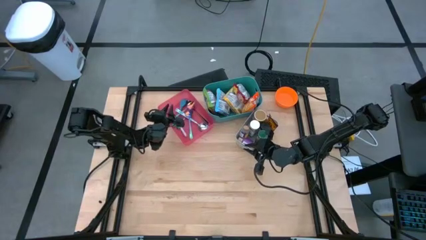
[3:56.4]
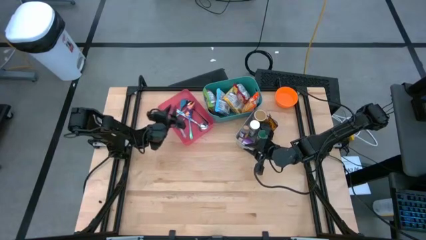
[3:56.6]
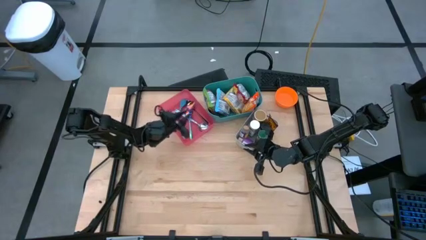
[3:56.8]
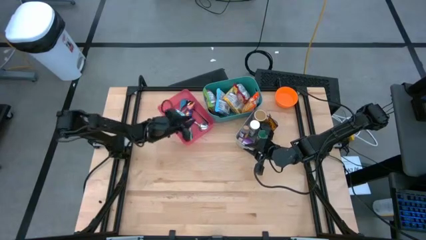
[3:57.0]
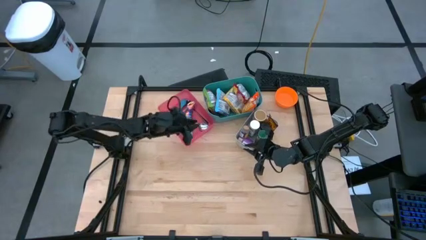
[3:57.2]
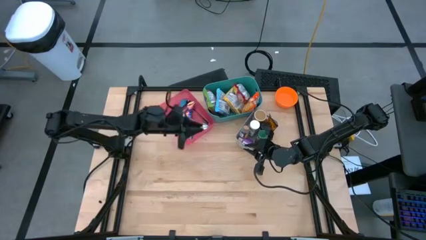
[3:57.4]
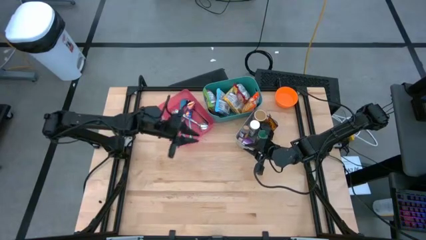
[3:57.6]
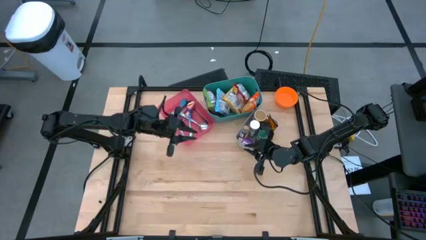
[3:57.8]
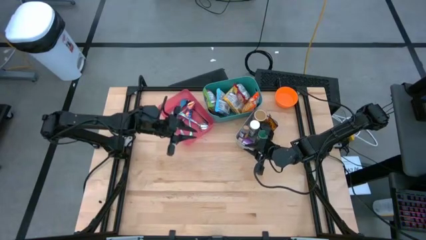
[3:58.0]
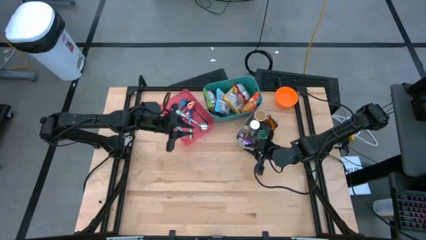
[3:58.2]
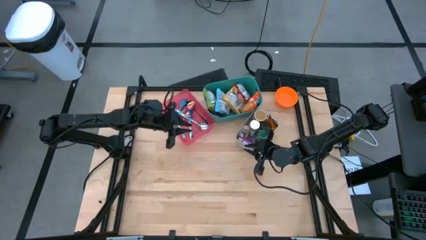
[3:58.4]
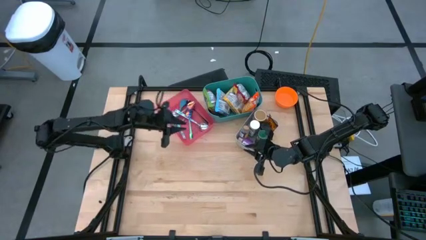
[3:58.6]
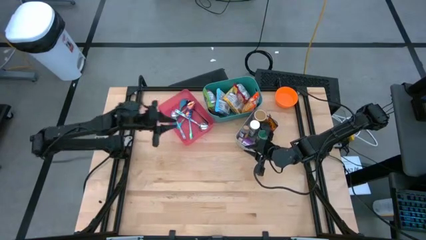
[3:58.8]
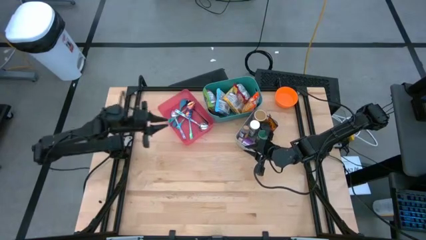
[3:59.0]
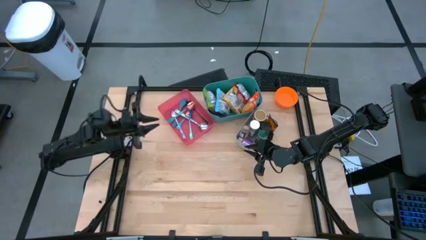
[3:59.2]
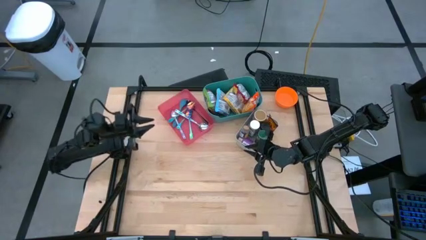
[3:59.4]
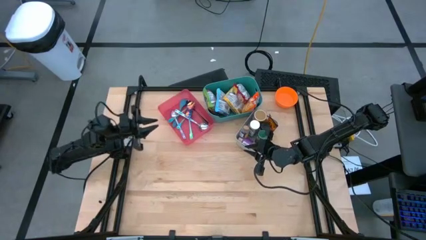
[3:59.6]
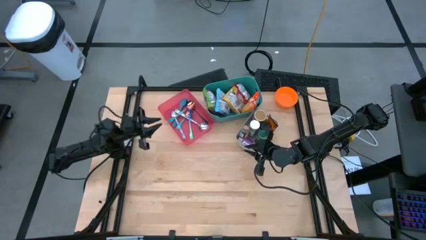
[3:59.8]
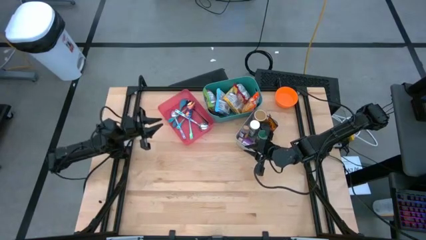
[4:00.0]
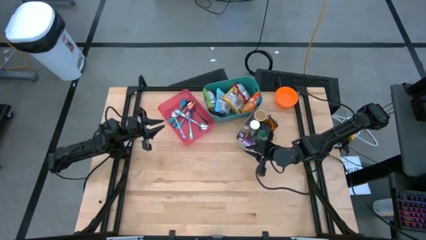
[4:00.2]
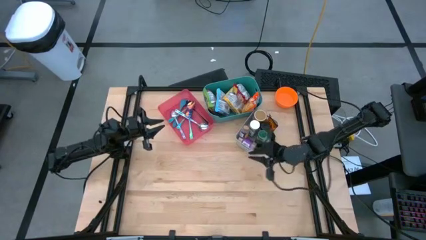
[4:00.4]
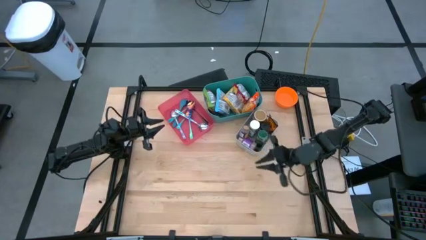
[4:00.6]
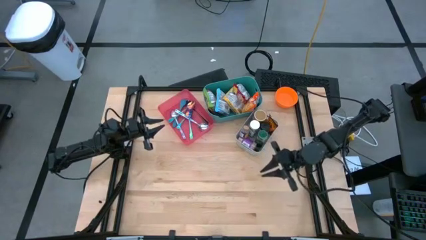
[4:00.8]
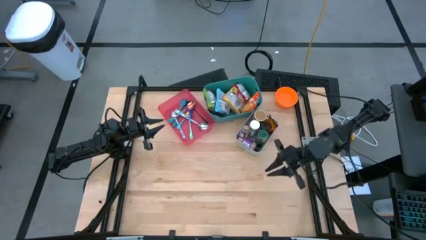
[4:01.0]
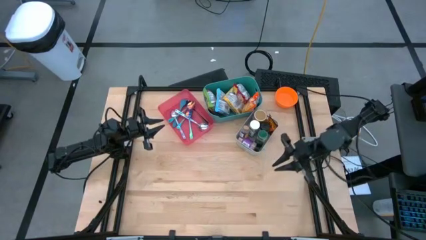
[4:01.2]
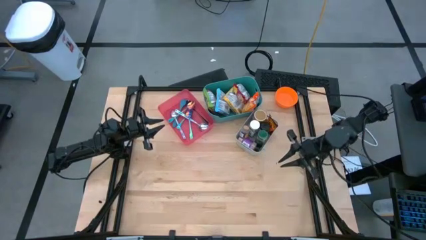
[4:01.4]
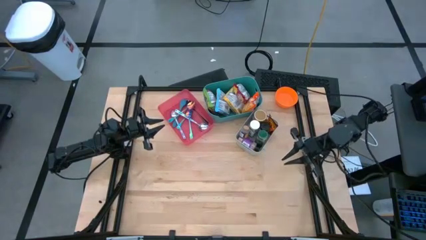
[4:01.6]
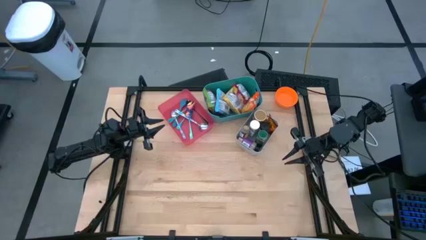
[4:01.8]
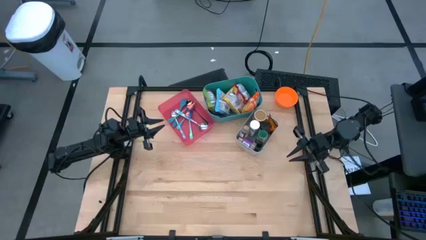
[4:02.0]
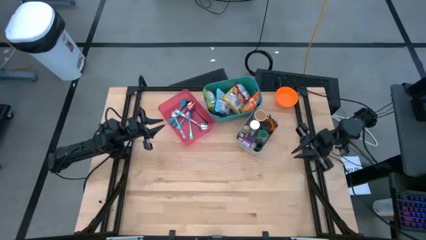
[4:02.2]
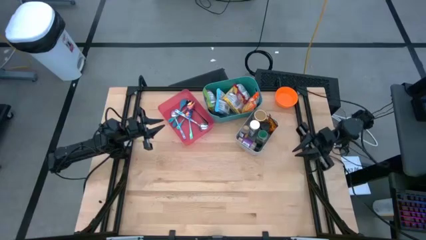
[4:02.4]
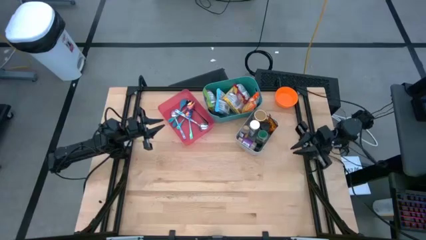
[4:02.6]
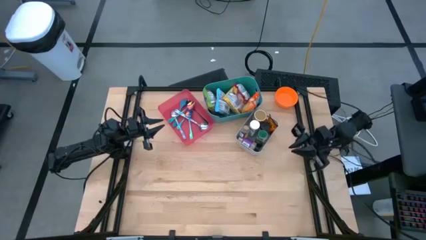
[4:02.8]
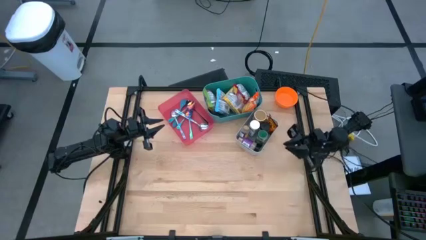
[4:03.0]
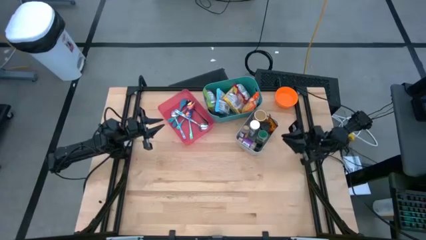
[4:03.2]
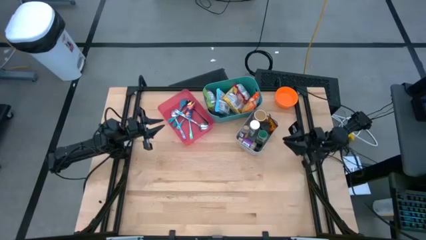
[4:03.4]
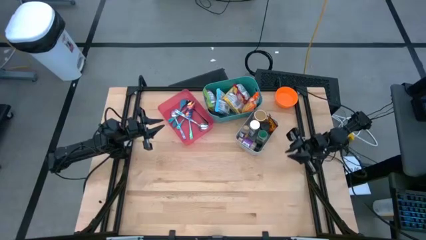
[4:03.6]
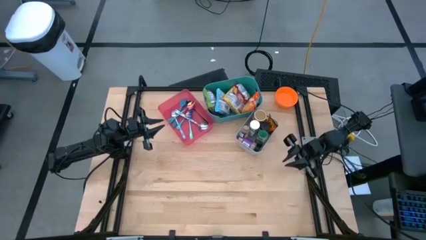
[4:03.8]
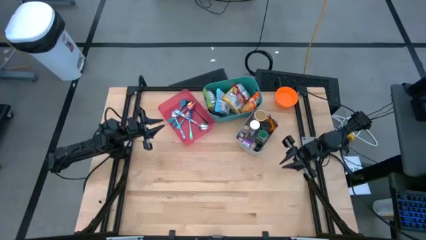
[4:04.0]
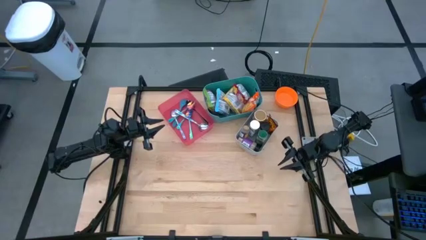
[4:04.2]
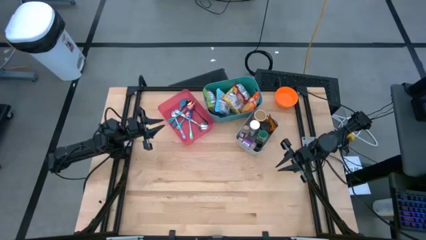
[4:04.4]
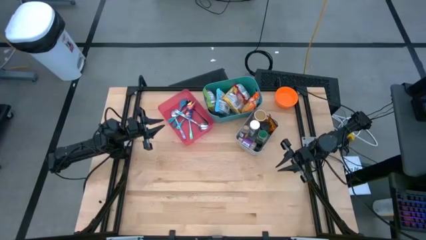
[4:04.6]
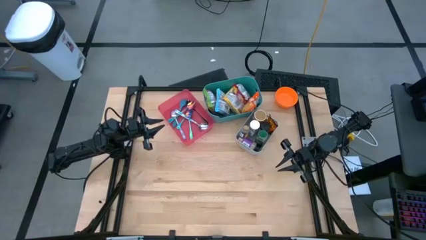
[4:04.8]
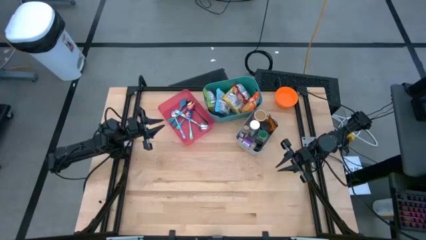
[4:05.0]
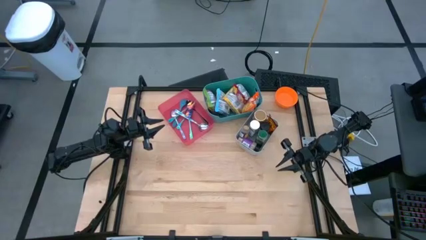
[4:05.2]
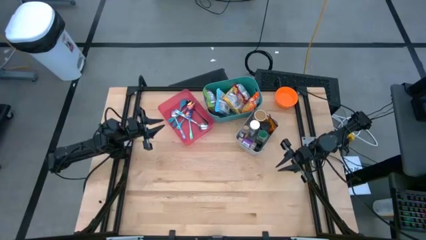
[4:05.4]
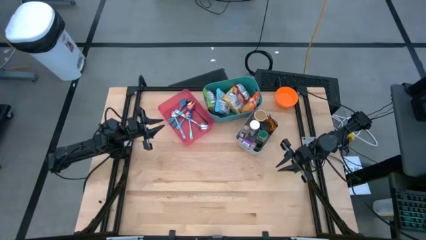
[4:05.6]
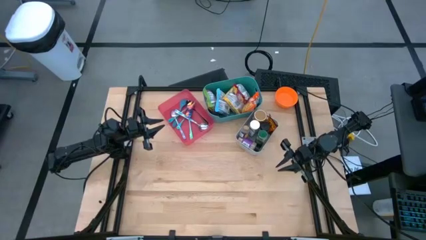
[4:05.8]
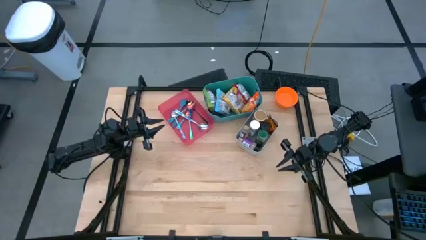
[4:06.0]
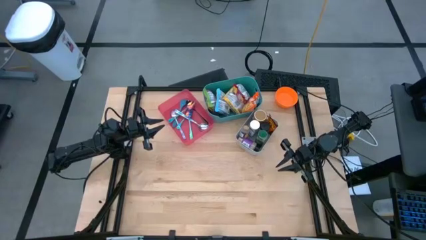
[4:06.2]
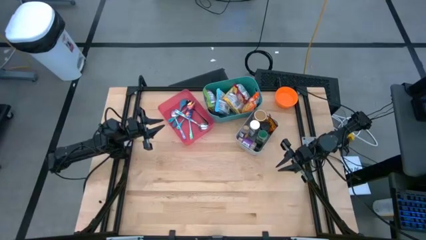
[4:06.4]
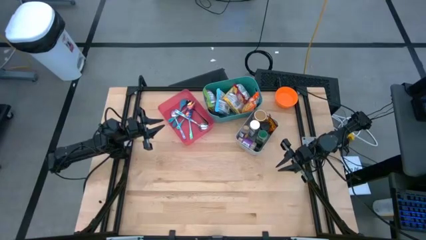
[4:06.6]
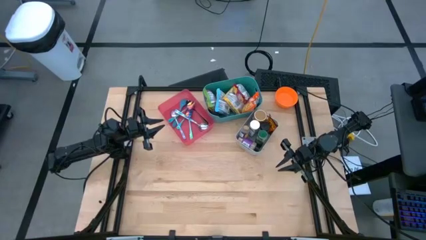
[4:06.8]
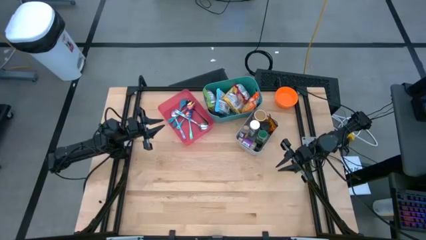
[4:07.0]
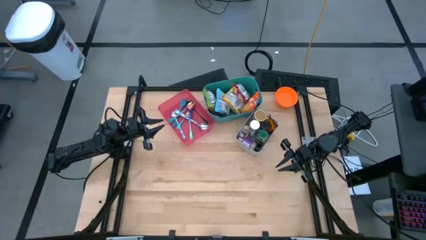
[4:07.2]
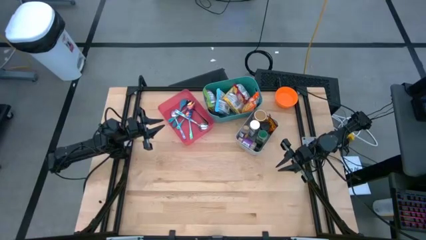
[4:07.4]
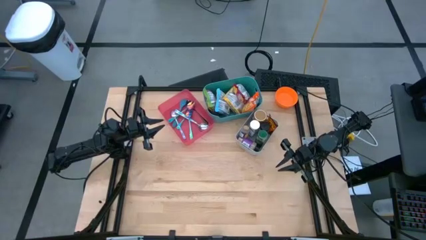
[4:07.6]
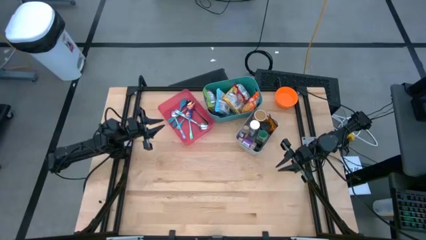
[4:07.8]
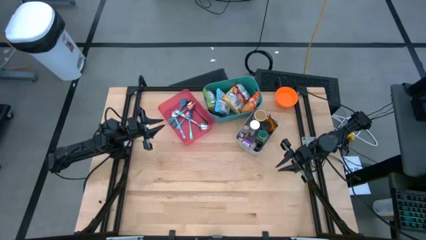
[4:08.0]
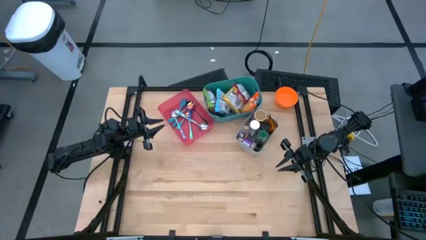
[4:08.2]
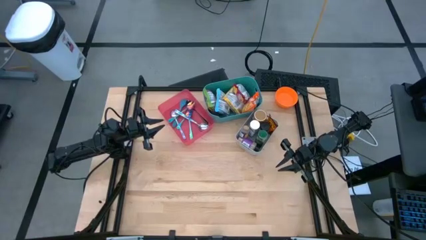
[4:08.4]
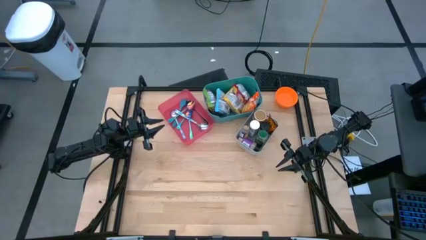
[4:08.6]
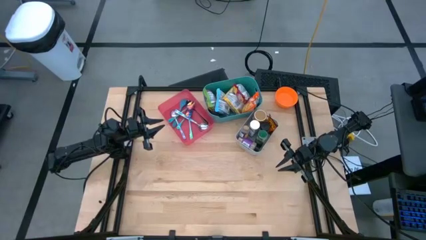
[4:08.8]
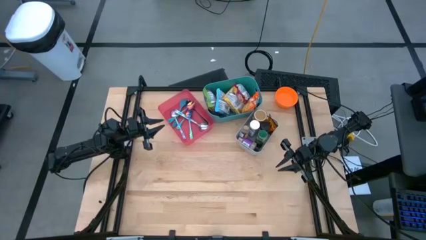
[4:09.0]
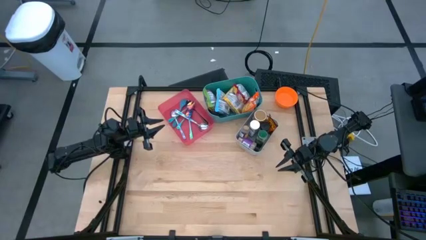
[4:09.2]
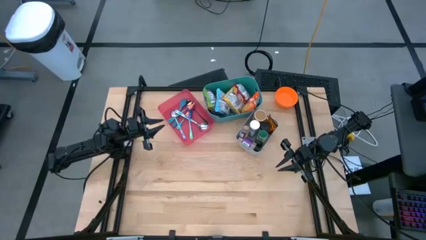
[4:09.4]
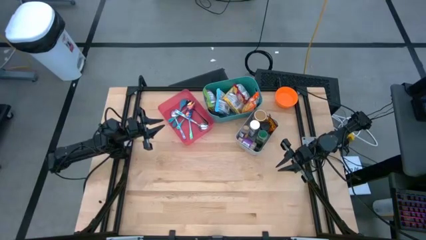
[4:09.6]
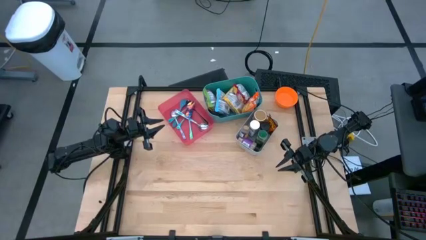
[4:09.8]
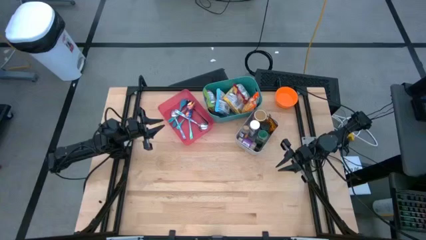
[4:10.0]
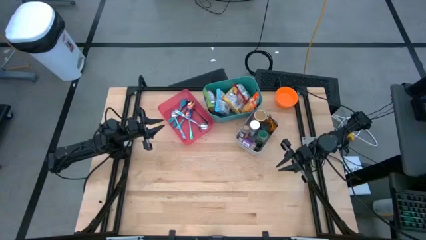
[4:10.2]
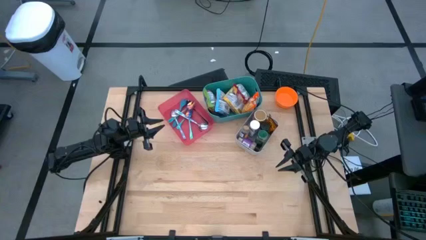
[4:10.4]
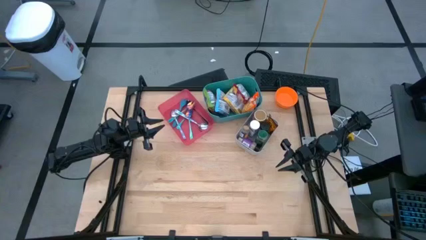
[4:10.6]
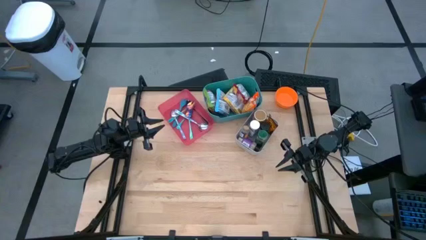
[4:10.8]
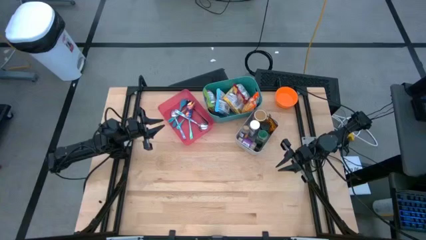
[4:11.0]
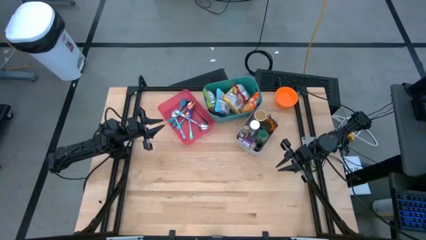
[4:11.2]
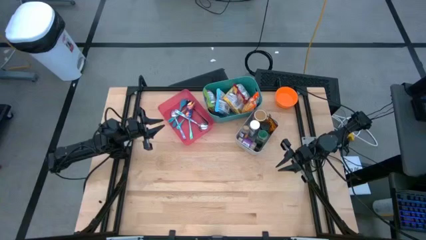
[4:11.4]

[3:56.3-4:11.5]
Task: Pick & Place Food Item
Return to home position

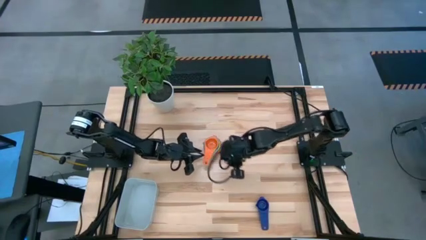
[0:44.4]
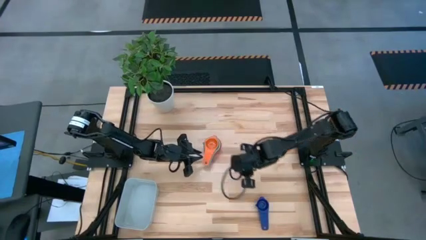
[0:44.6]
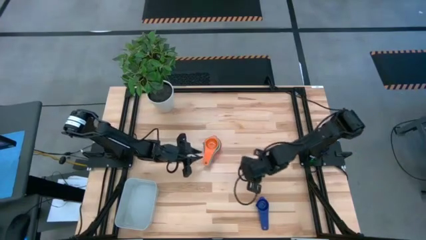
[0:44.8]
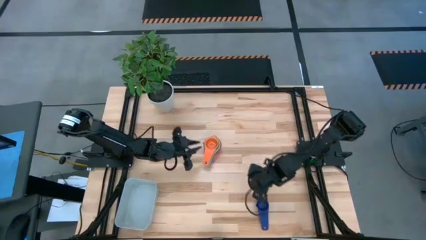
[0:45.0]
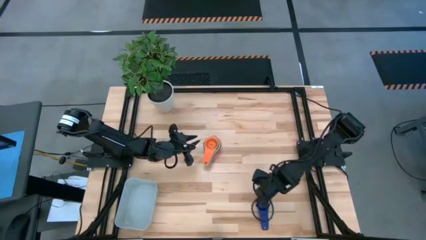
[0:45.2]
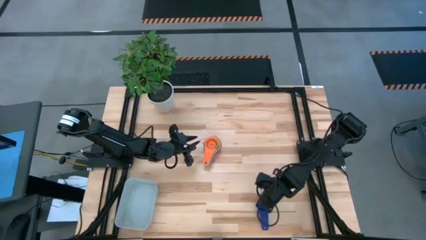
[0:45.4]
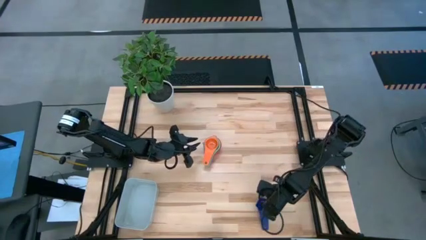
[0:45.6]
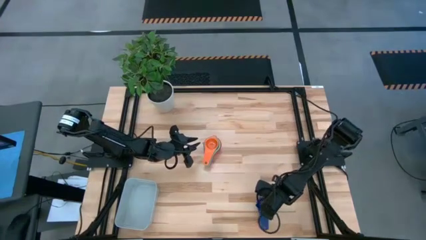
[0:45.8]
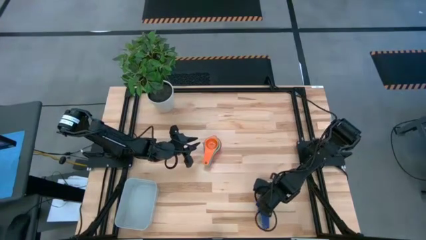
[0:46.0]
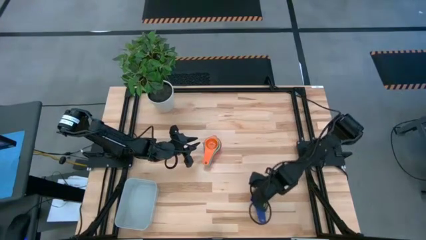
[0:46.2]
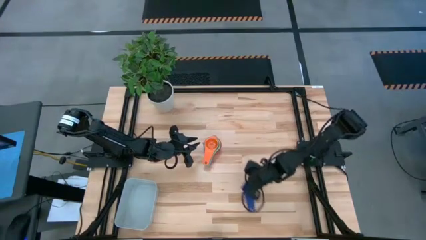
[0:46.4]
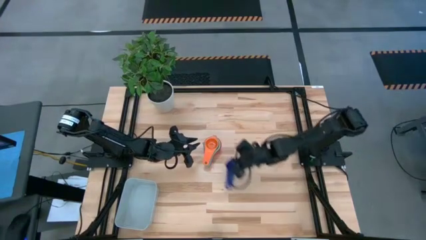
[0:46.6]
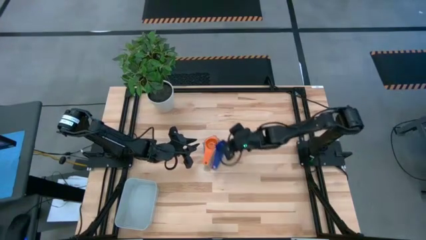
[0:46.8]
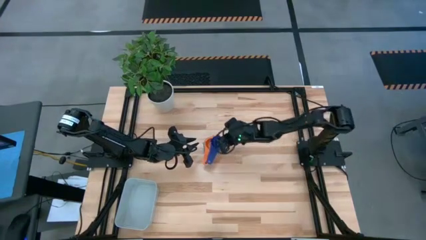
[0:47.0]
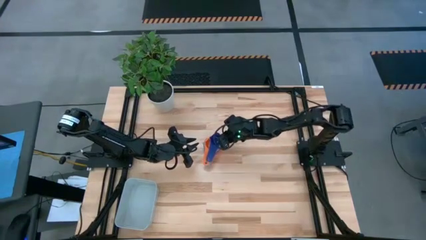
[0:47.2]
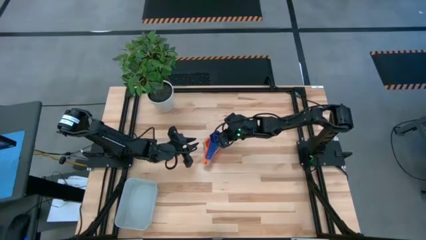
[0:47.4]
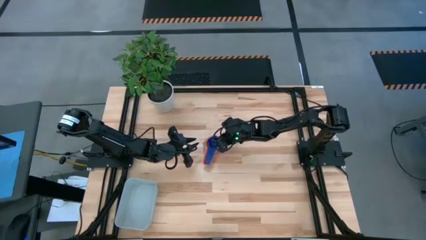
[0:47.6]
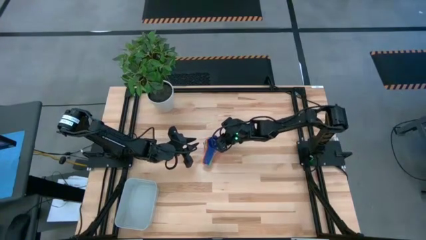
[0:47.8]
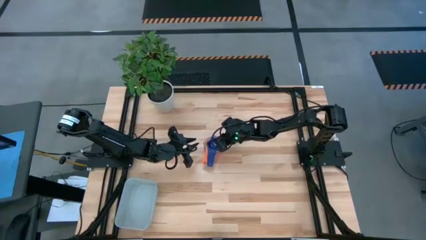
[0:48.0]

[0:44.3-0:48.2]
Task: Nest measuring cups in basket
Stack the dark blue measuring cup on the orange measuring cup
